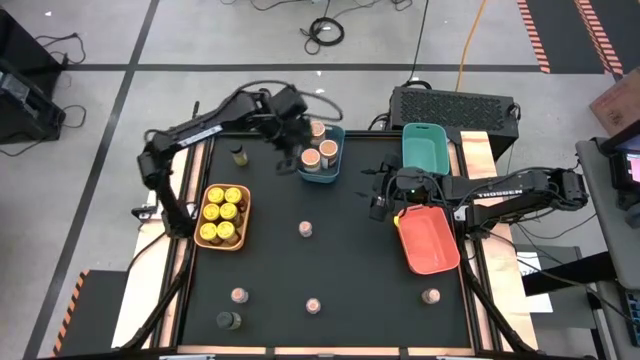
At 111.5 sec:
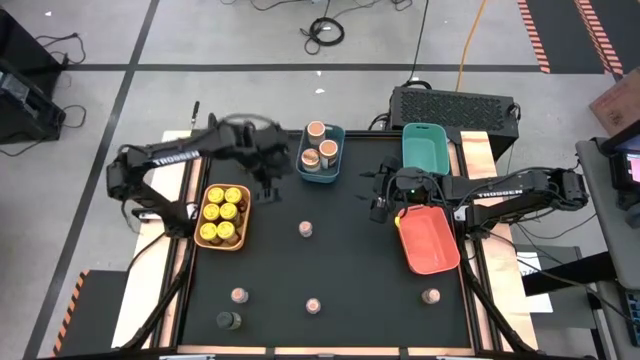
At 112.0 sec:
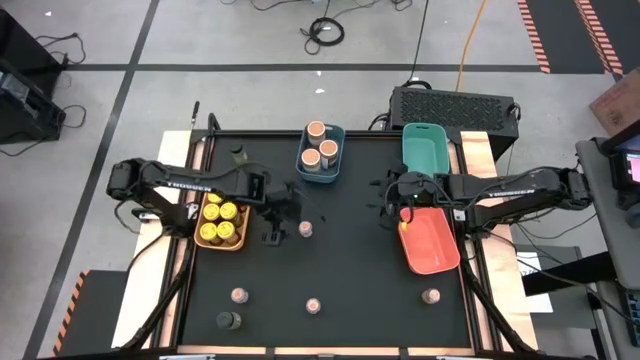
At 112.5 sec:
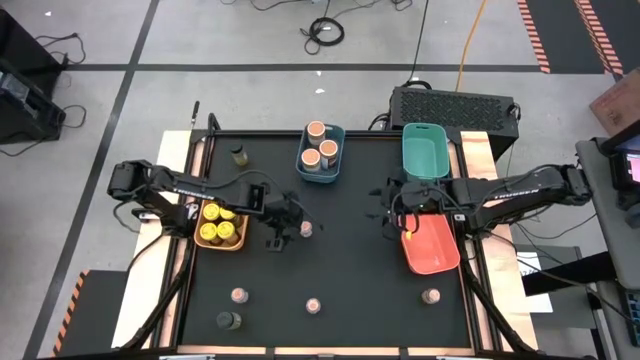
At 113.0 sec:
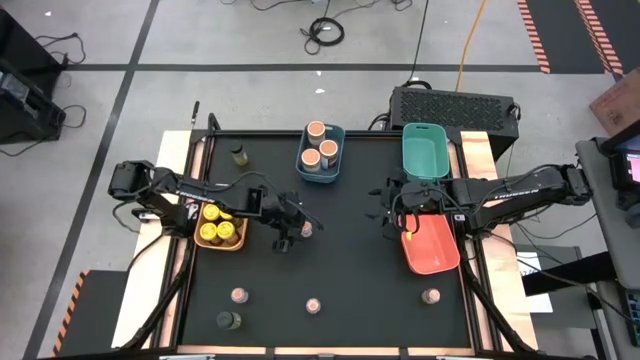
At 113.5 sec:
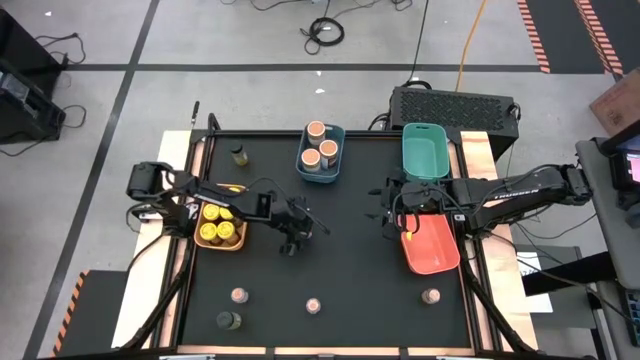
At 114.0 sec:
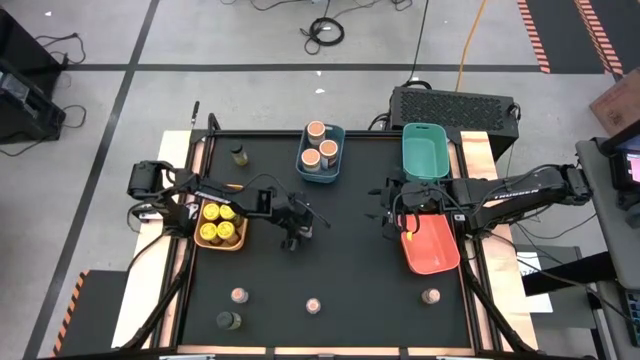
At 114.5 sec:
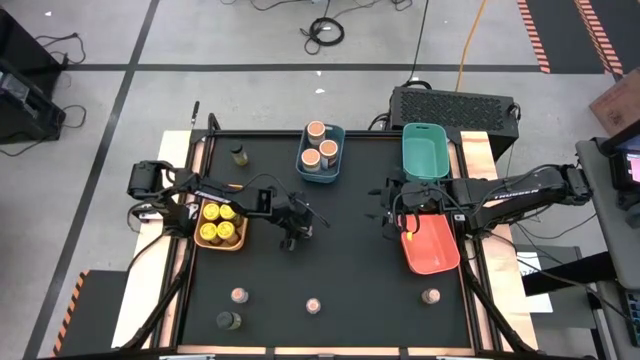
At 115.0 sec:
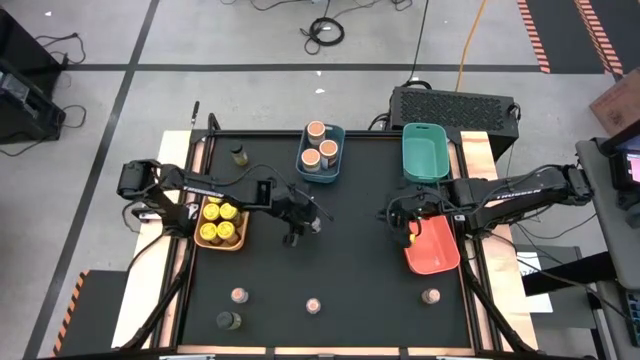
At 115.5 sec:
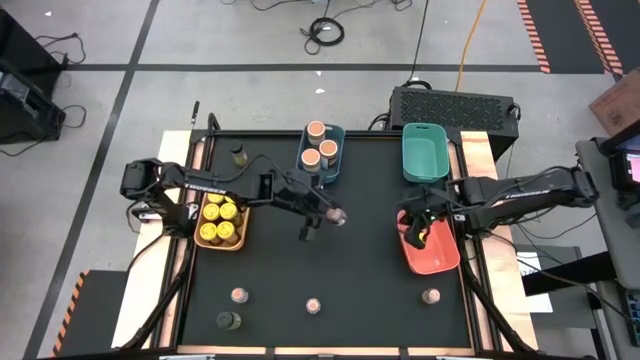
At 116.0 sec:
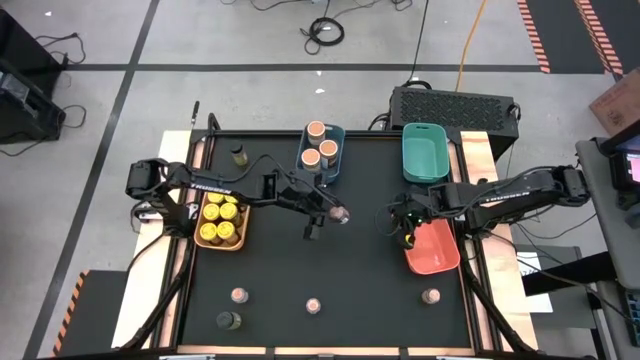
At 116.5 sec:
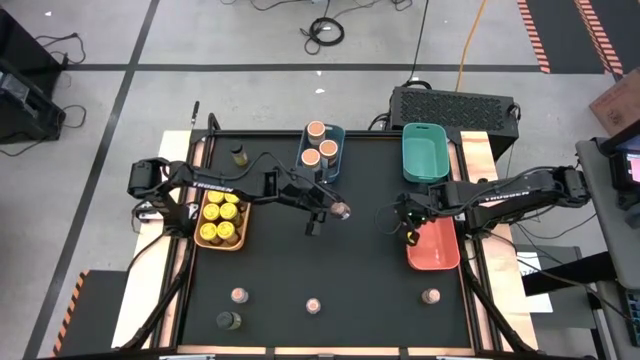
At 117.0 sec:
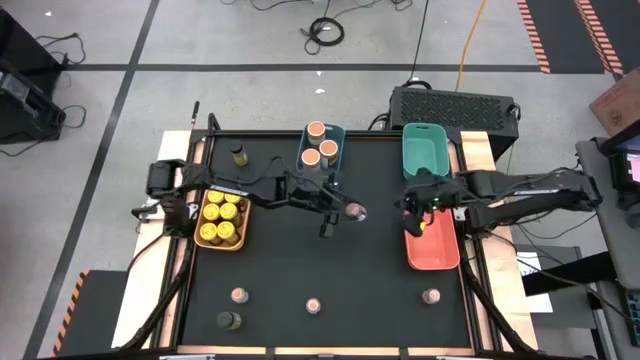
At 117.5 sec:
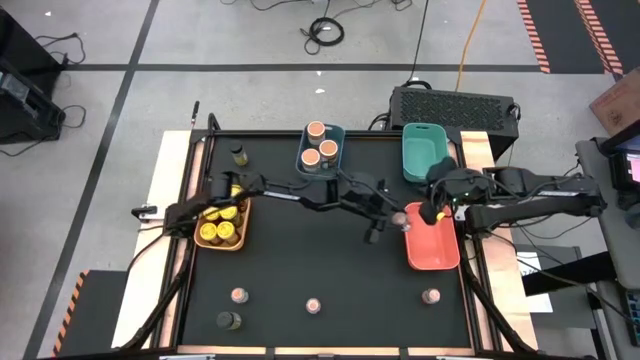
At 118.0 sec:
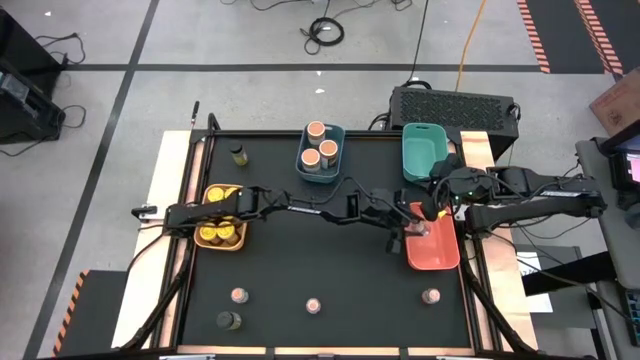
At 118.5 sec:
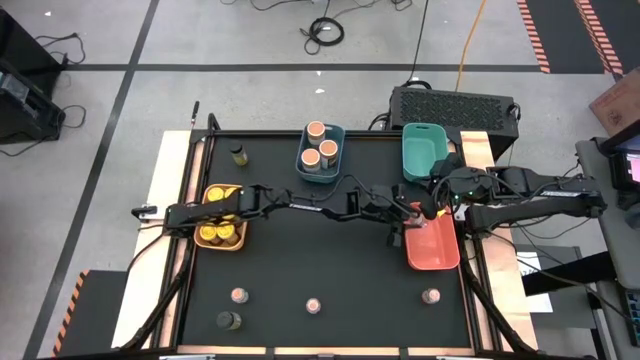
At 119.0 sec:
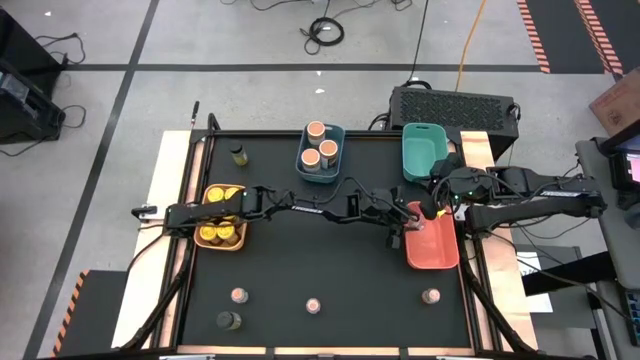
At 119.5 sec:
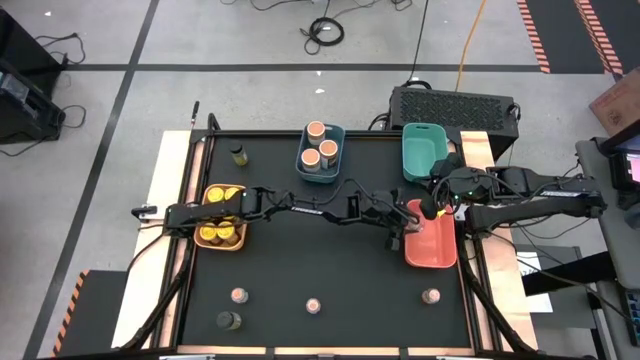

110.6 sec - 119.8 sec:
Task: Sort spices by type
Put the small brown seasoning bottle into the orange bin

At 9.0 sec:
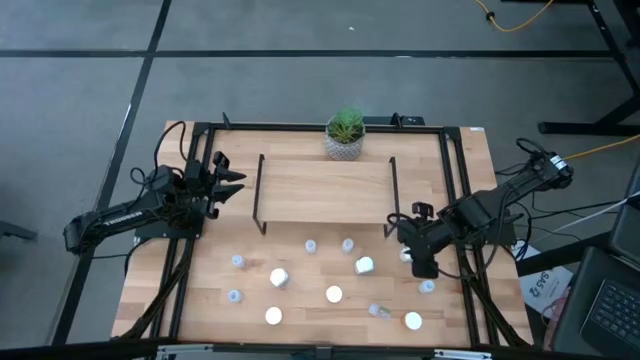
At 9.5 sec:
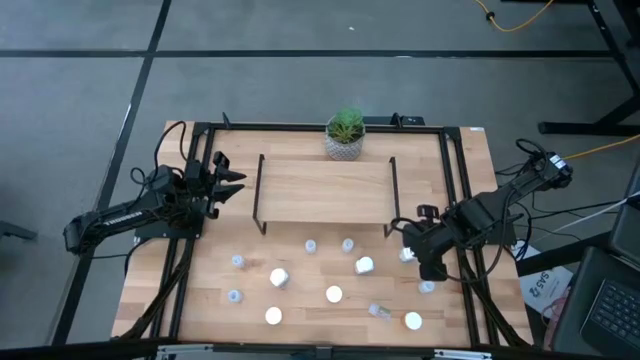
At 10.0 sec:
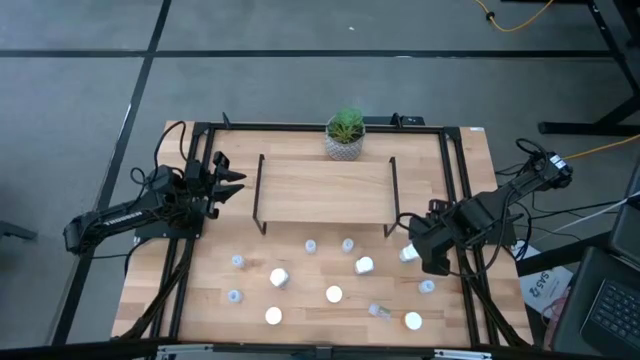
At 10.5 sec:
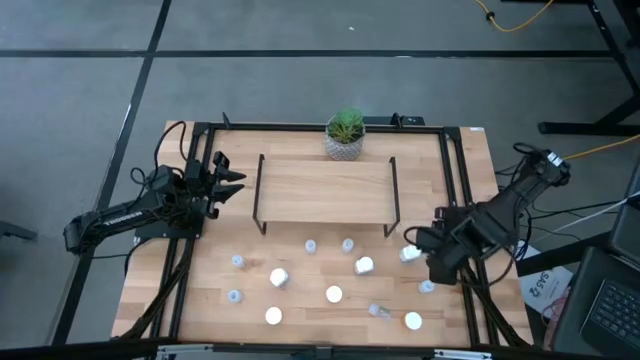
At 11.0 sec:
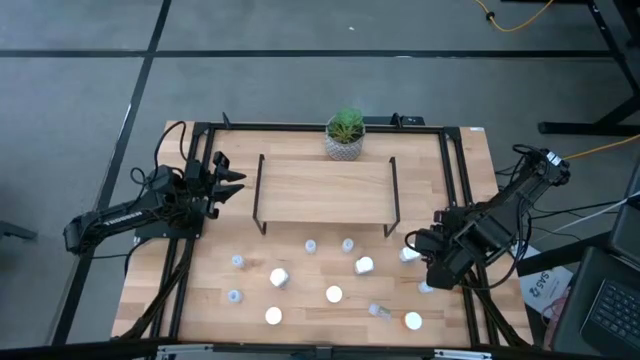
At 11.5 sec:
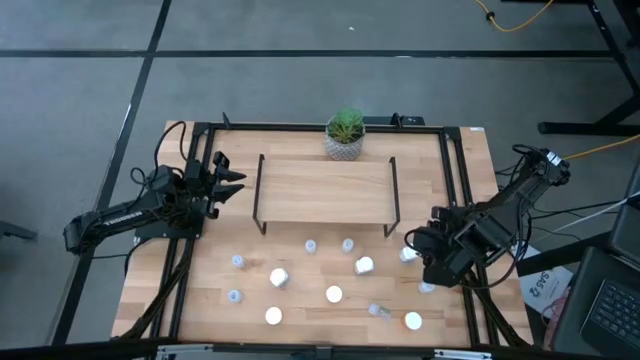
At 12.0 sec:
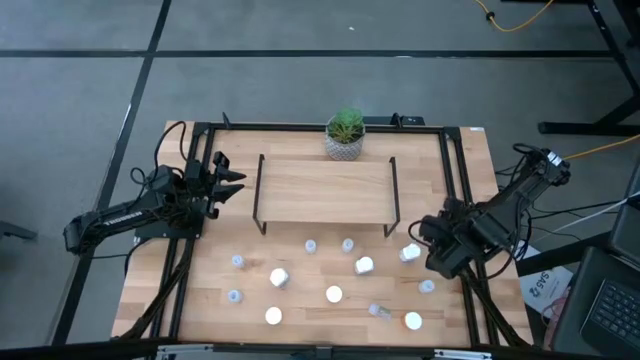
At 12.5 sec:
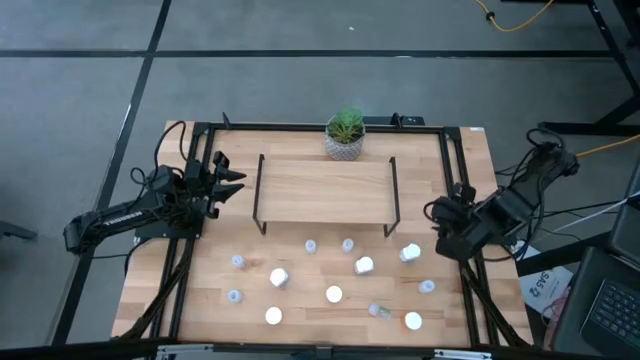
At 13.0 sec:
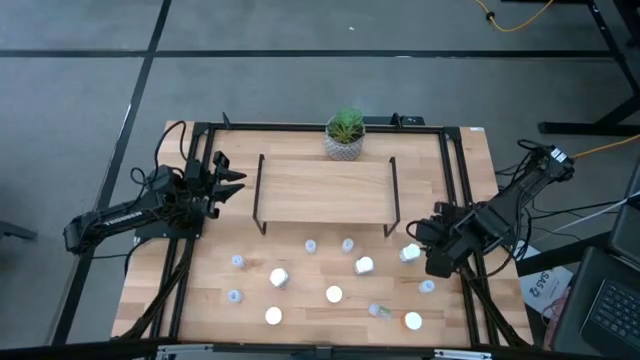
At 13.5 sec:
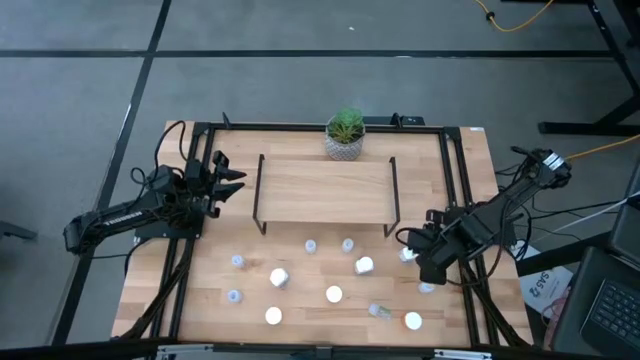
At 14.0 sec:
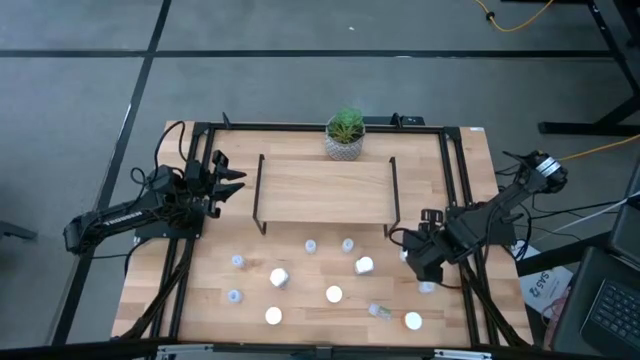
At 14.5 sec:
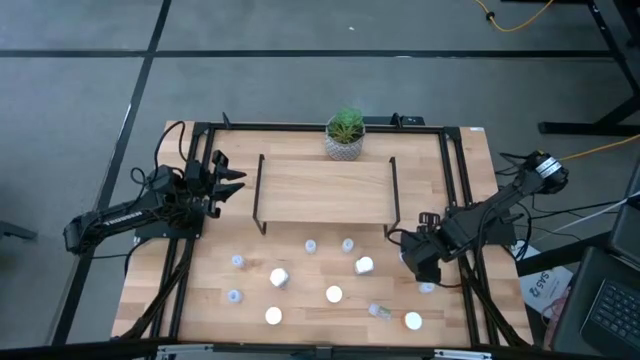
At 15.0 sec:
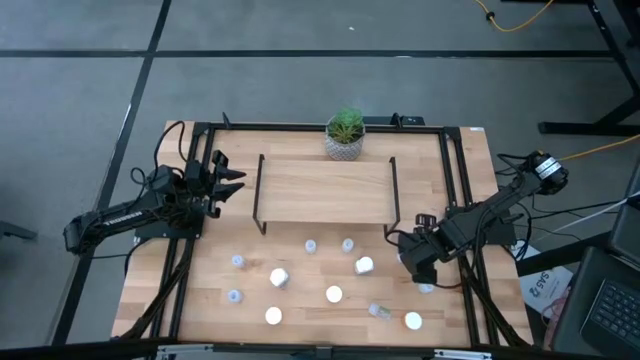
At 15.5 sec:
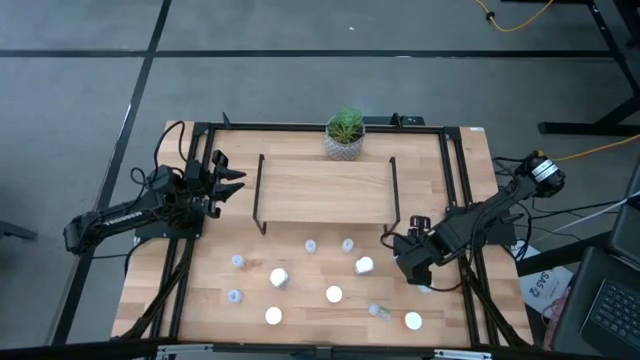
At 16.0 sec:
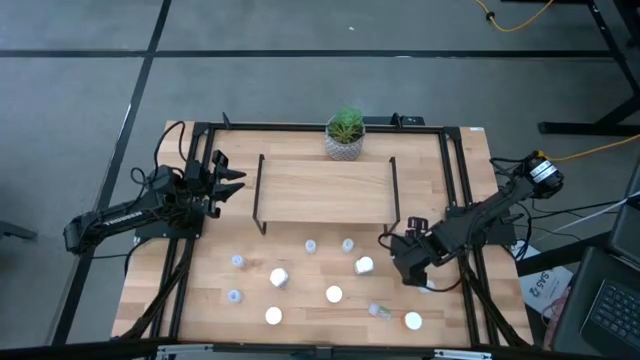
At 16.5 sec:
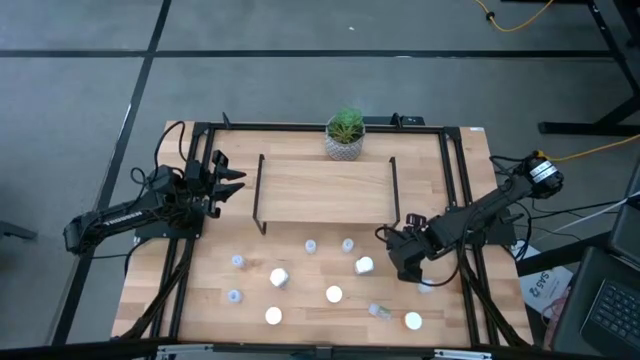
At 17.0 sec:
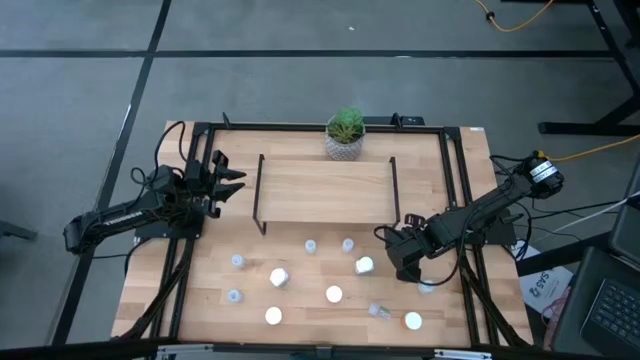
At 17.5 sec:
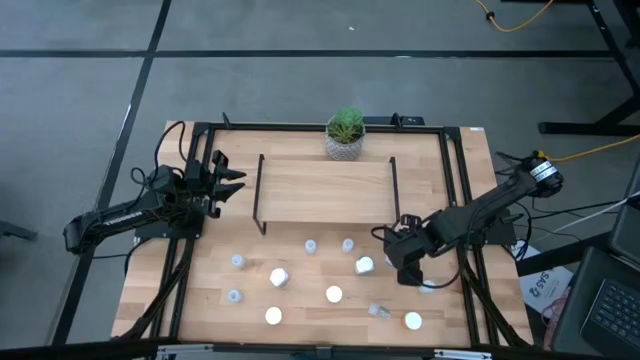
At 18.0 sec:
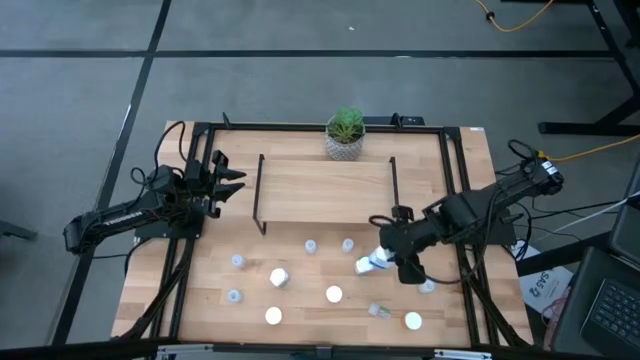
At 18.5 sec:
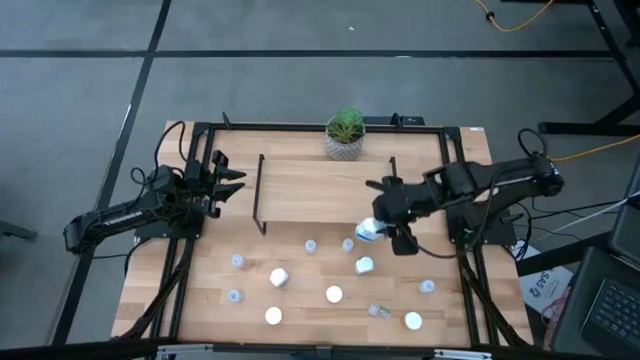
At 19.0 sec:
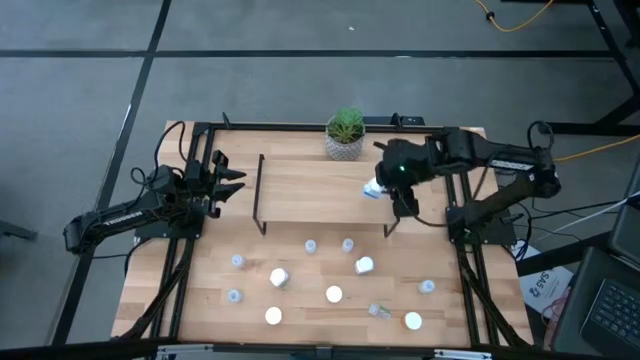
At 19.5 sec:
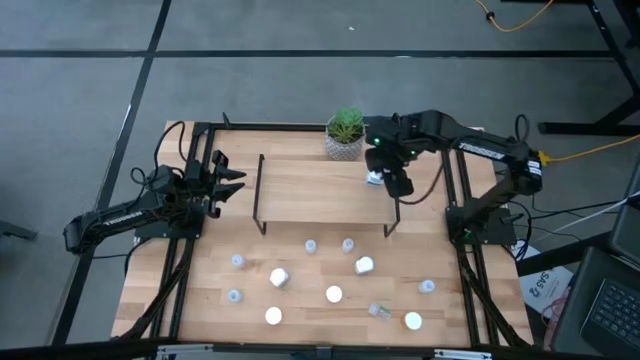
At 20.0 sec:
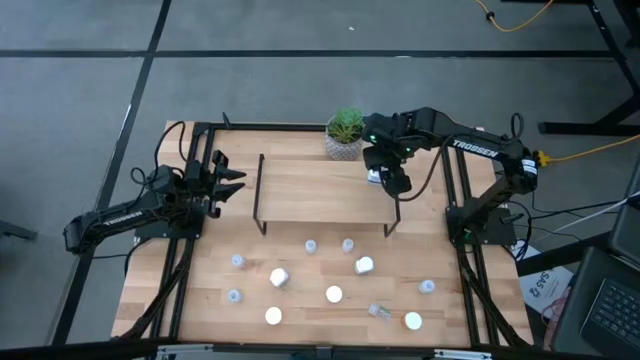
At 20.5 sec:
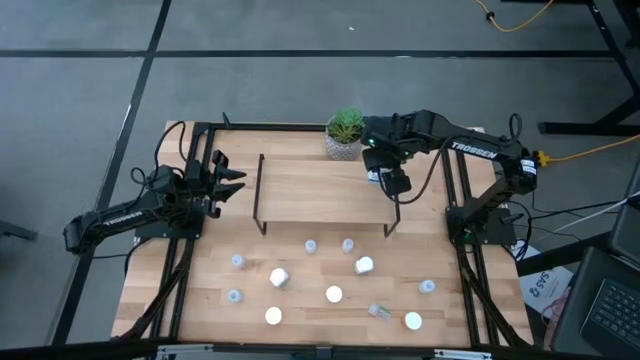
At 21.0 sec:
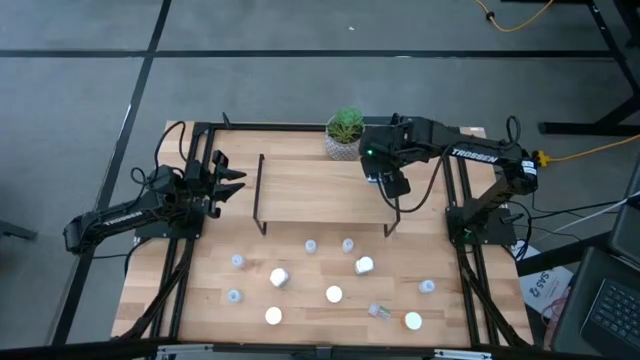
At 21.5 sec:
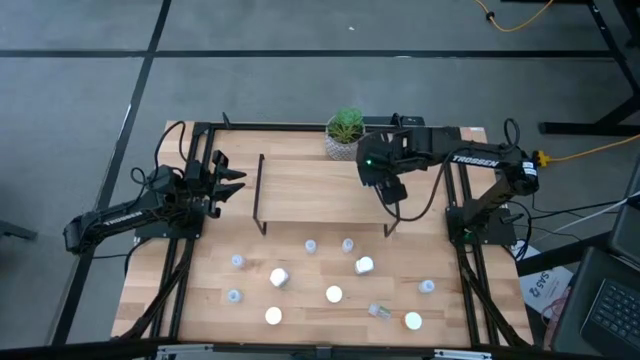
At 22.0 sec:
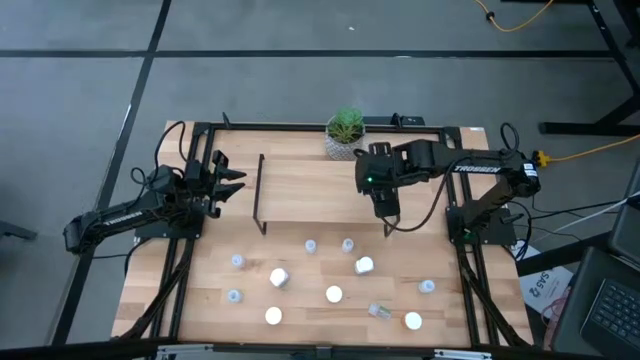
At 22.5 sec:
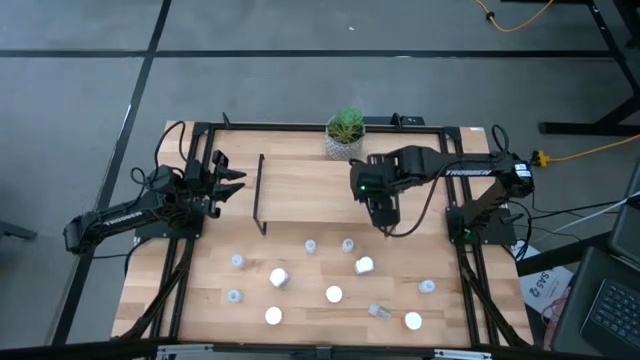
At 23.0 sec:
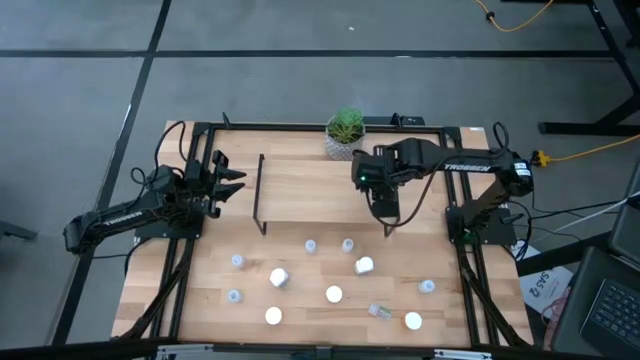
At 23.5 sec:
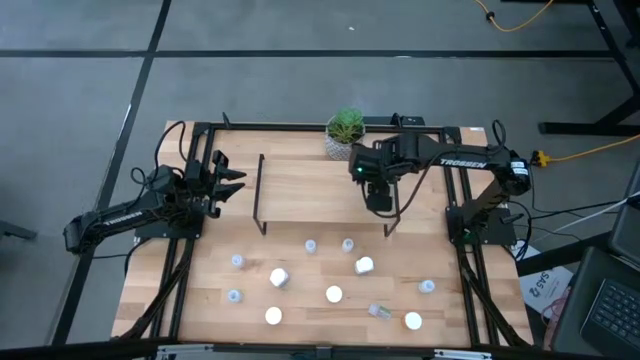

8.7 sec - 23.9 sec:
Task: Pick and place medicine bottles onto shelf by color
Put the top left white medicine bottle on the shelf
